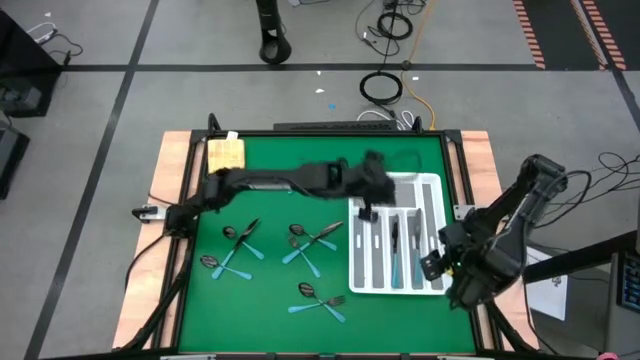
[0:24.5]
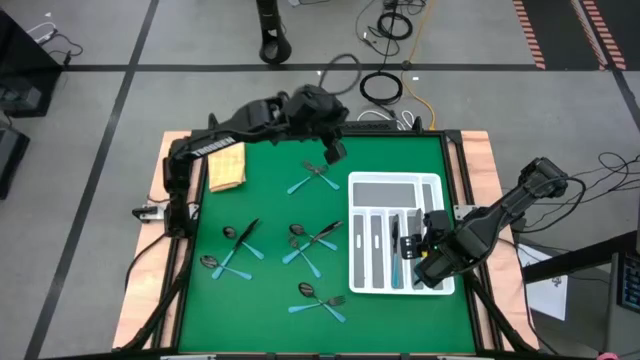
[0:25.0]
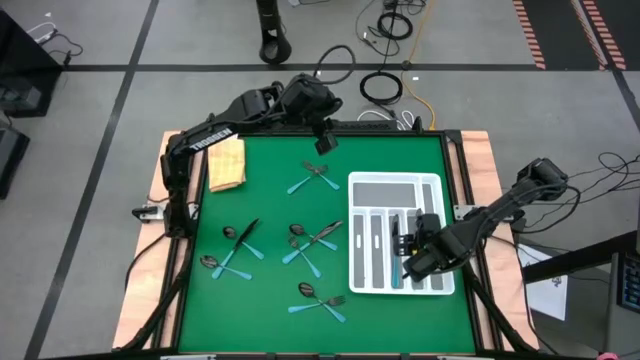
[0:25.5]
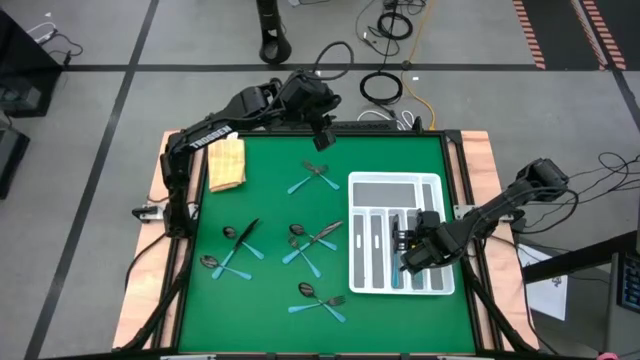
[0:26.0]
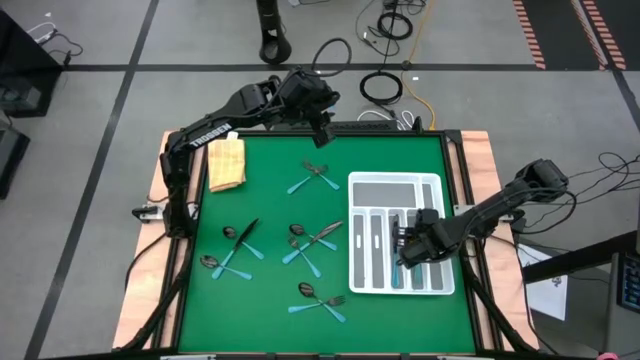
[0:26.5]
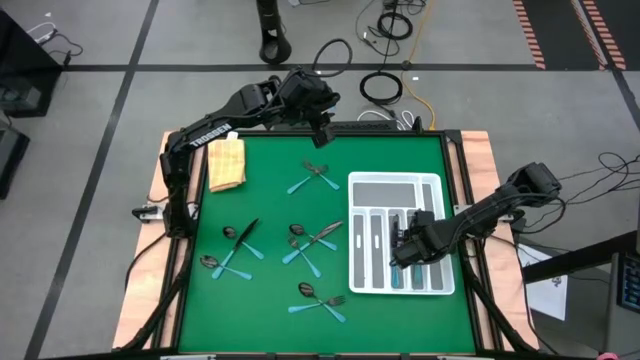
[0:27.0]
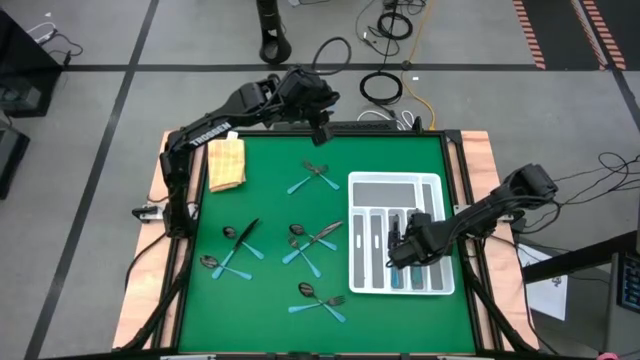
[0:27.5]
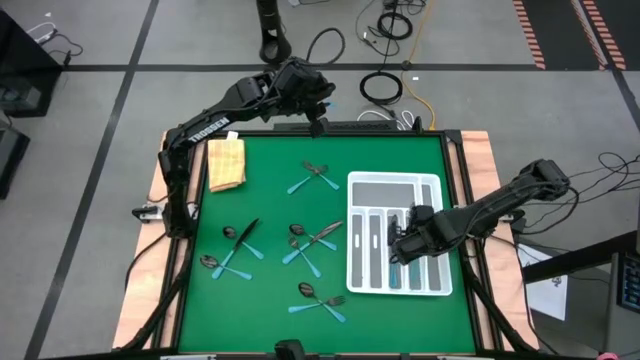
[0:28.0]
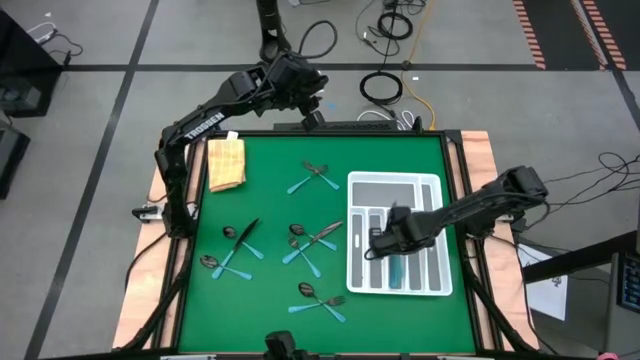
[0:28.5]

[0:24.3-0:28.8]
Task: Sort silverware
Put the right blue knife into the tray

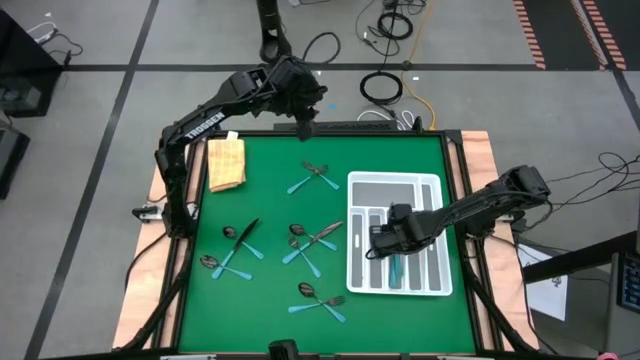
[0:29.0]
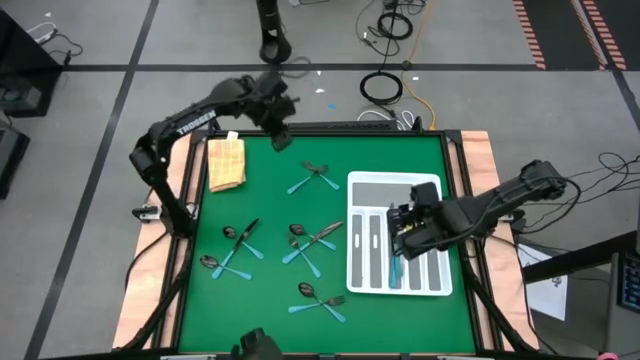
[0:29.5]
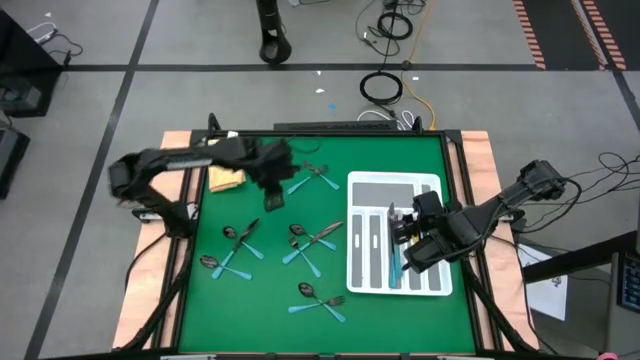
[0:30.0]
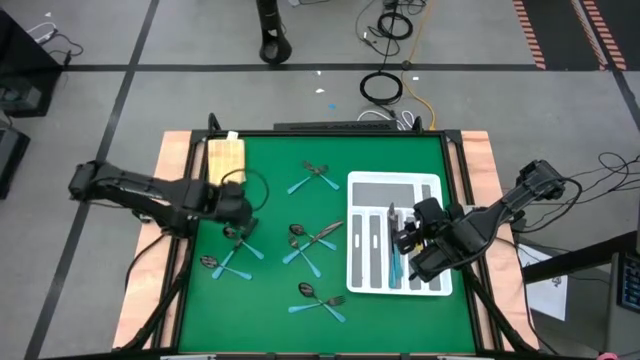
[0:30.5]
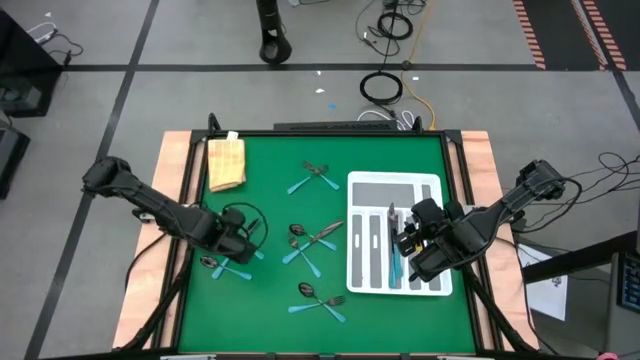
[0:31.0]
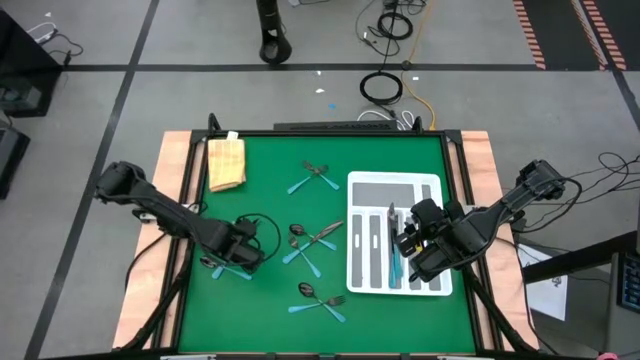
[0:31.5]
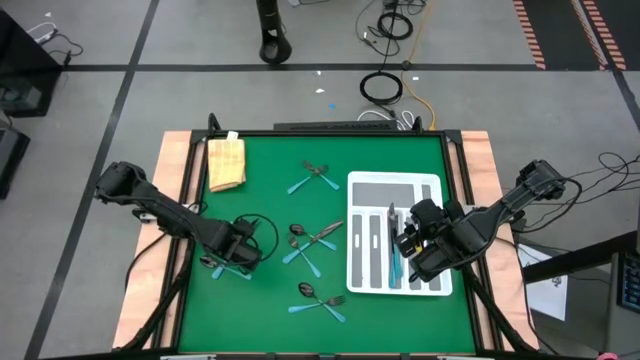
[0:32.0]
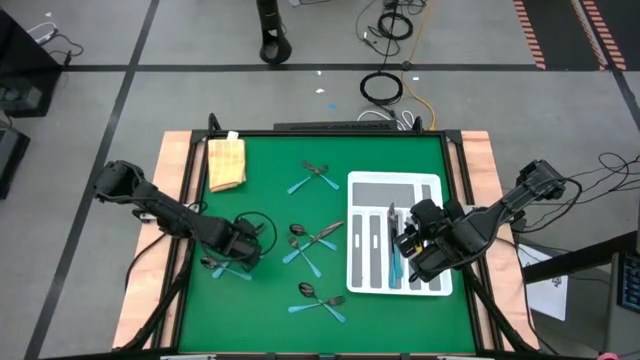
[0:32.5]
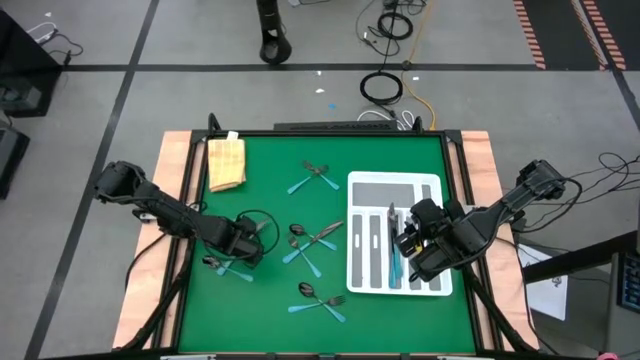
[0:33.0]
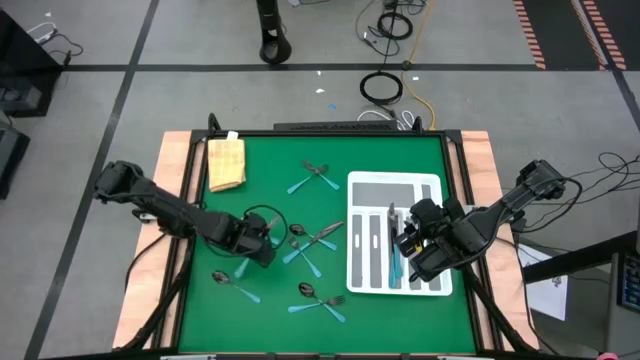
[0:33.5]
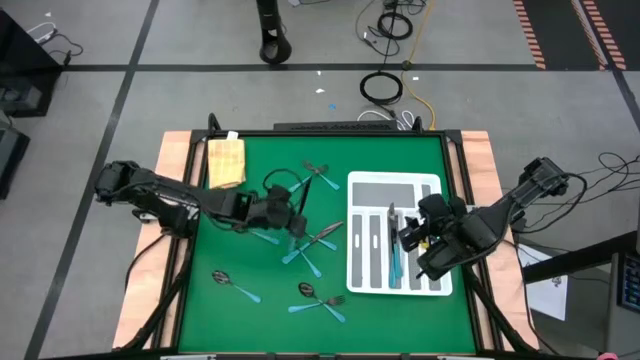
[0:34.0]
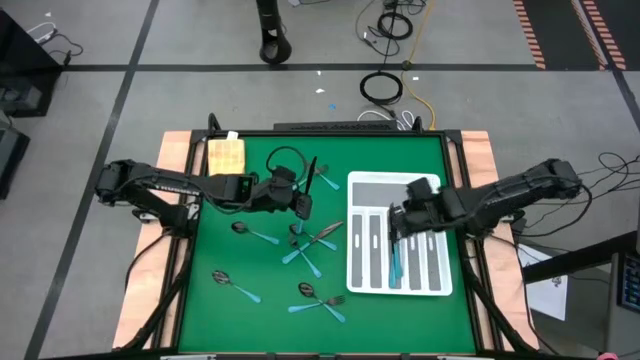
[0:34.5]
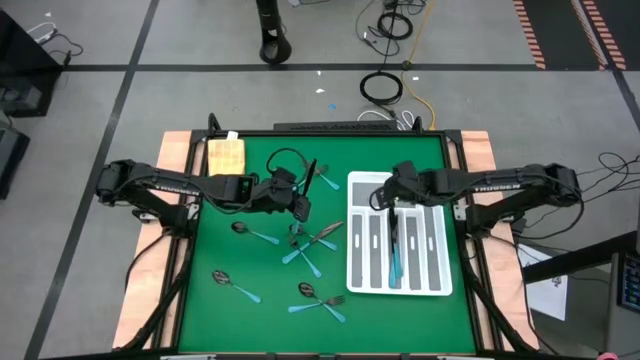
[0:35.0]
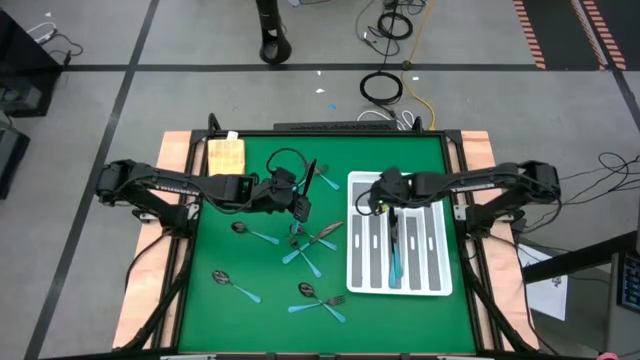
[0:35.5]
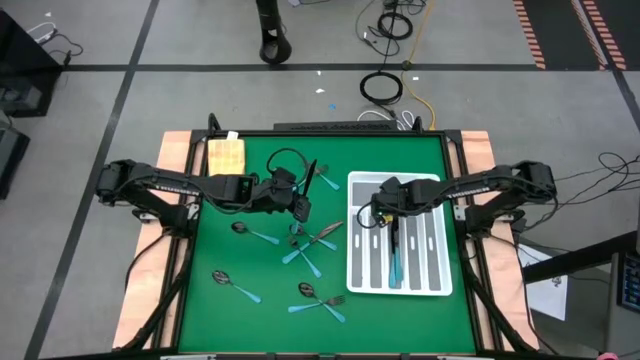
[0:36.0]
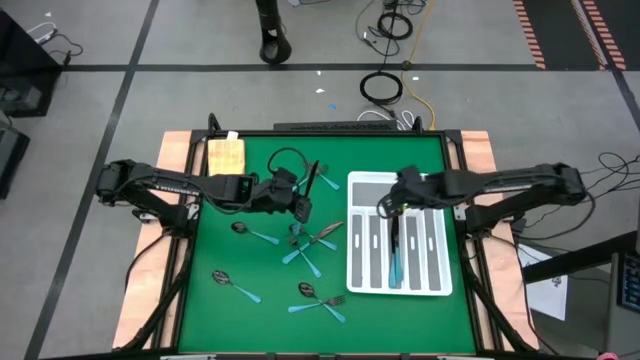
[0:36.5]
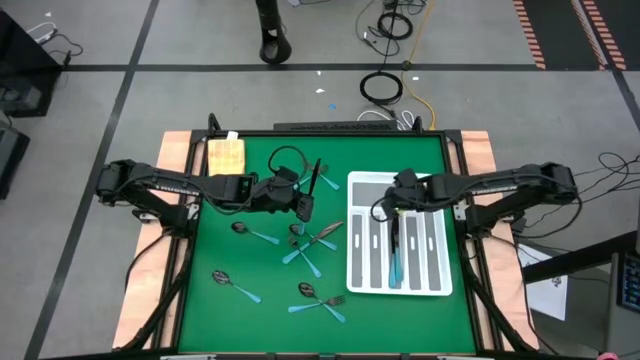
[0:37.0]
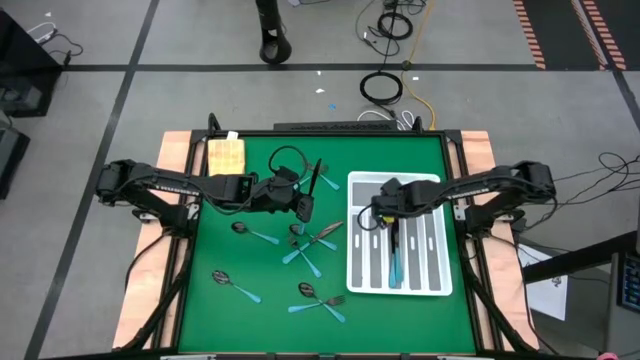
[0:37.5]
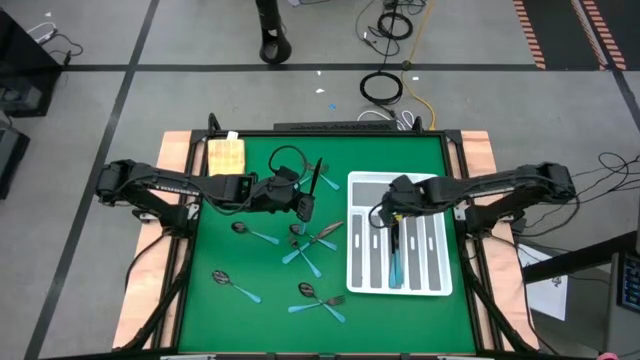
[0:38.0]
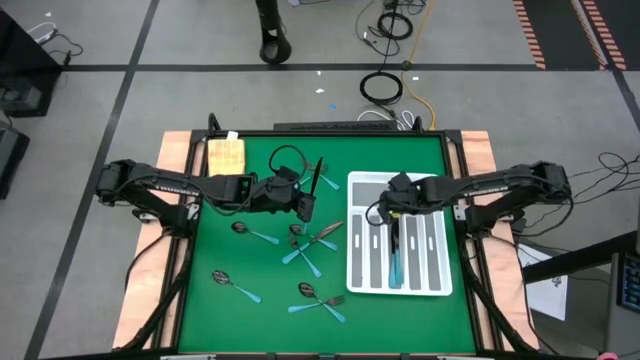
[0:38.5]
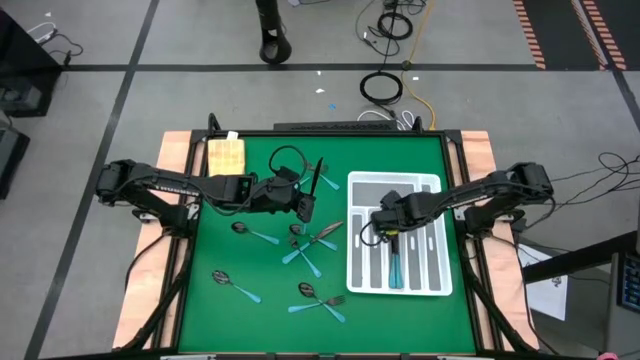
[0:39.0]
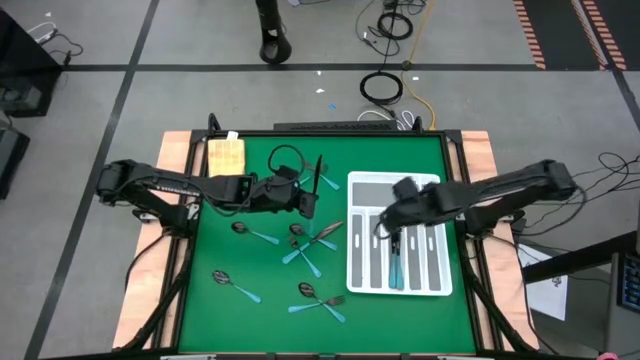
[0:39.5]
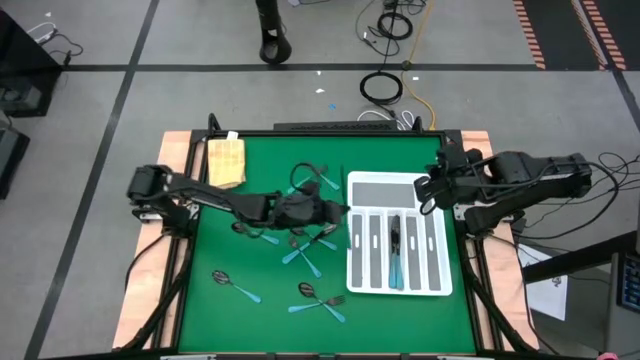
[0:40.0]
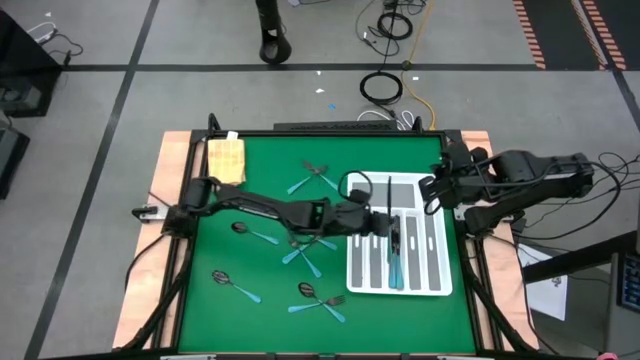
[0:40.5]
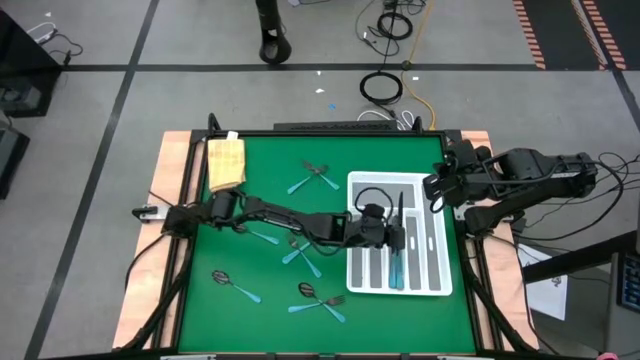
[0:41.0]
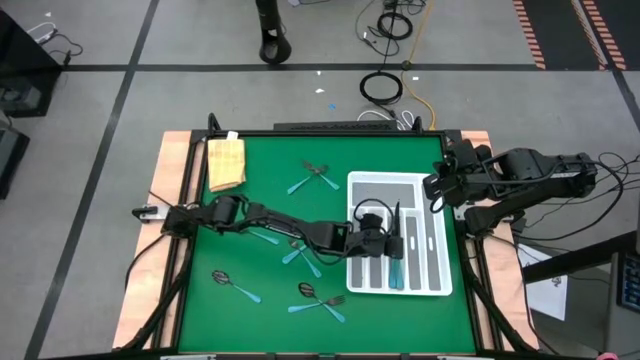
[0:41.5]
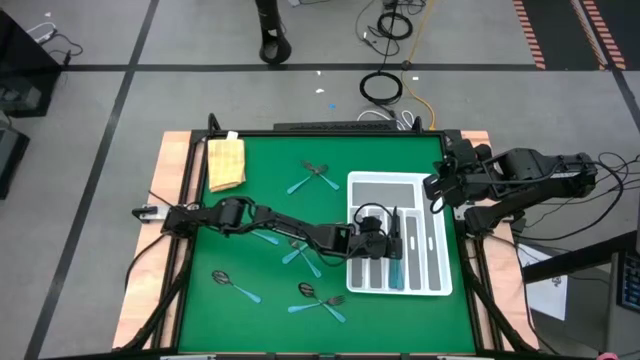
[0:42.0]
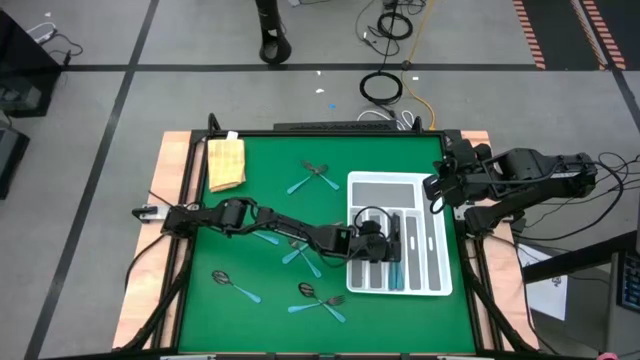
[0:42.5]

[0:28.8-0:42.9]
Put the left blue knife into the tray

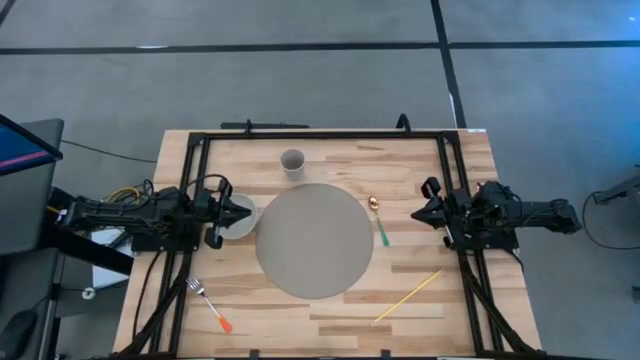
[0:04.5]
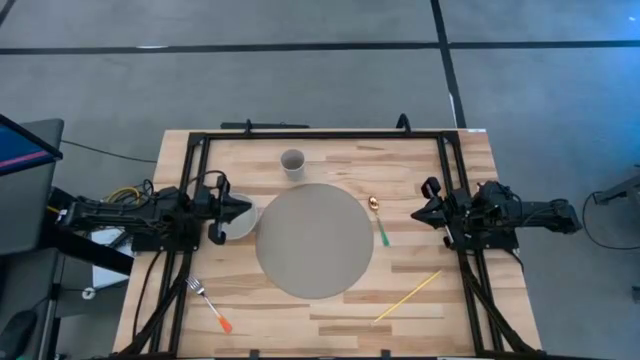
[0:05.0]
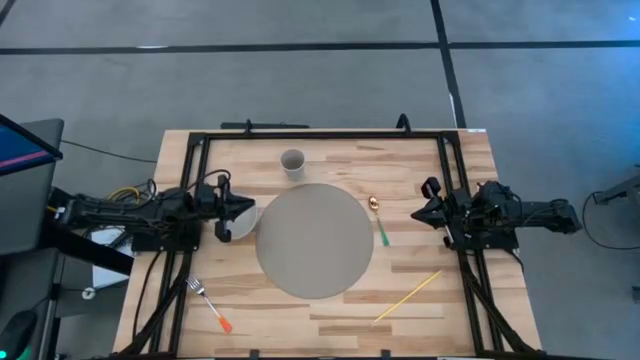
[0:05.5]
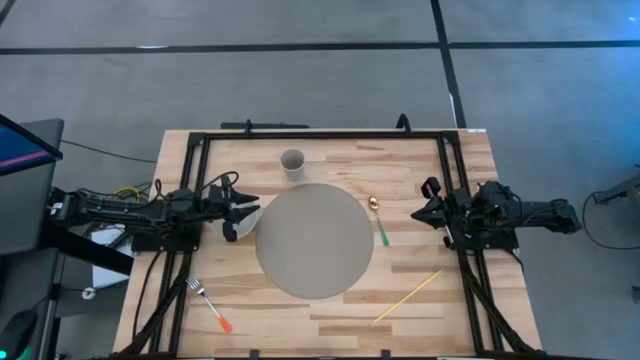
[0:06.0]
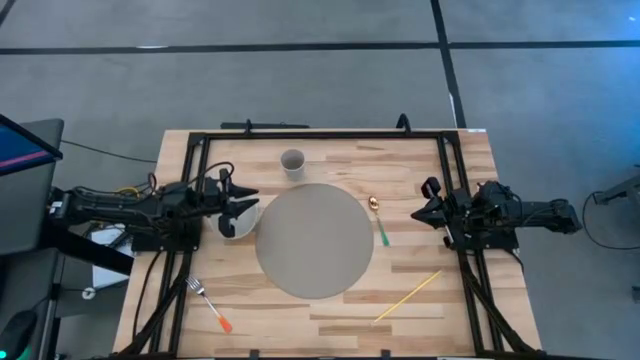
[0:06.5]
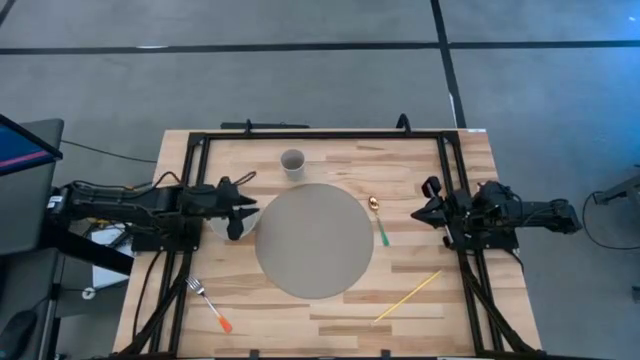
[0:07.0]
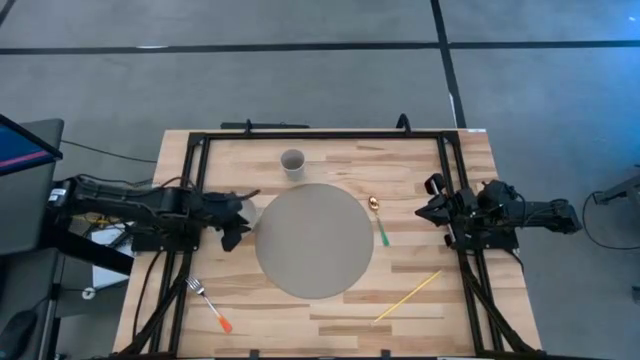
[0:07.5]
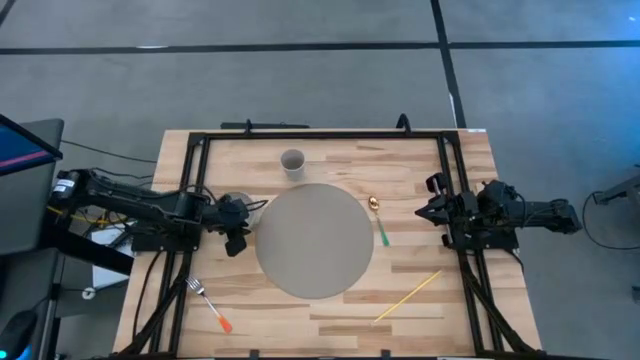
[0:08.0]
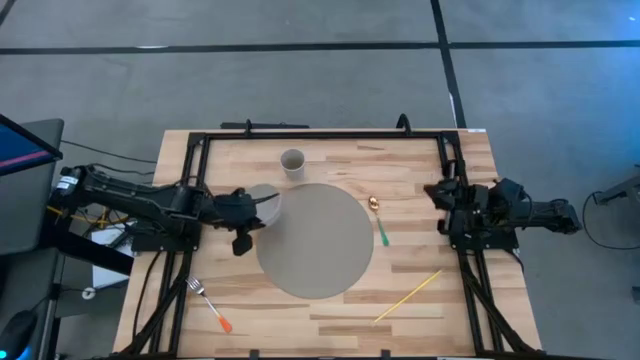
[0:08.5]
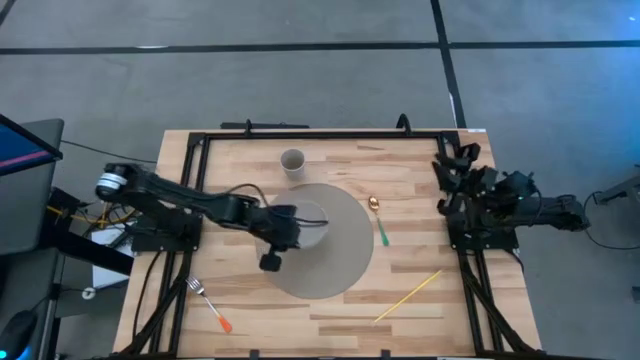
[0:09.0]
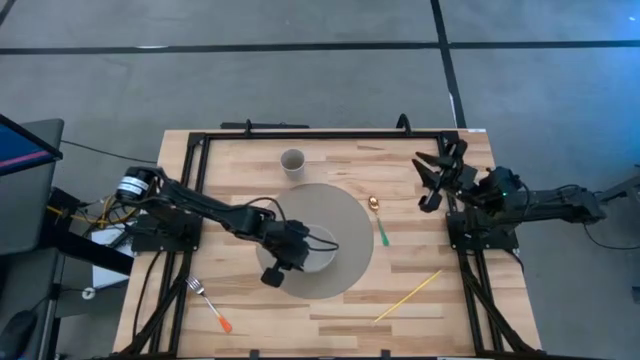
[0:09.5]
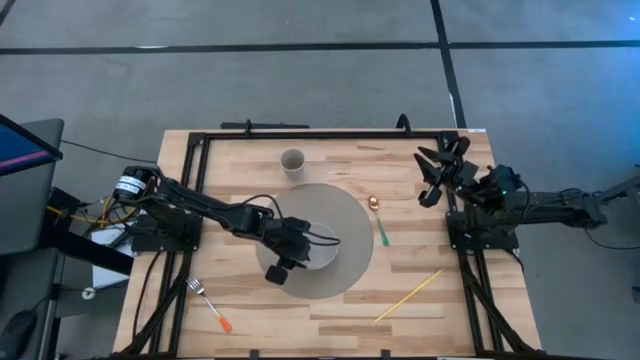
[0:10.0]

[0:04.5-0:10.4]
Task: Pick & Place Utensil
Put the gray bowl on the gray placemat
